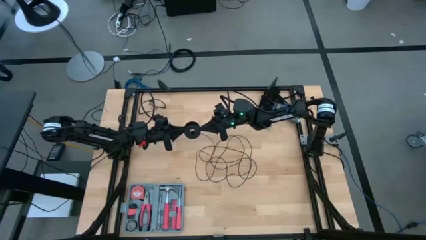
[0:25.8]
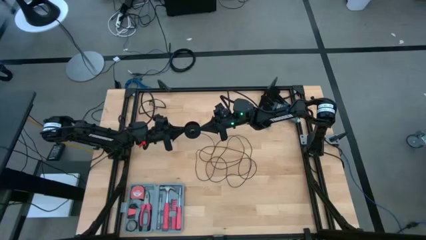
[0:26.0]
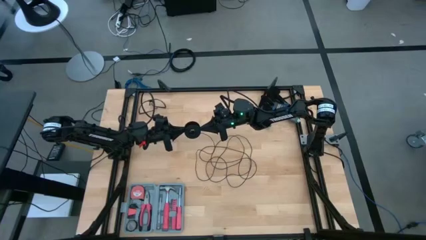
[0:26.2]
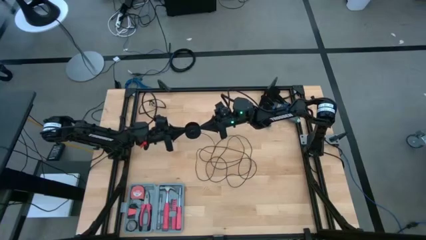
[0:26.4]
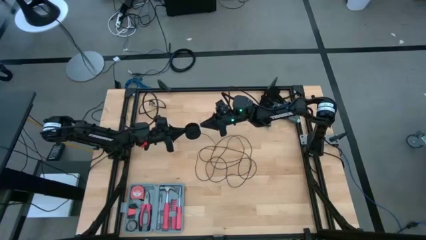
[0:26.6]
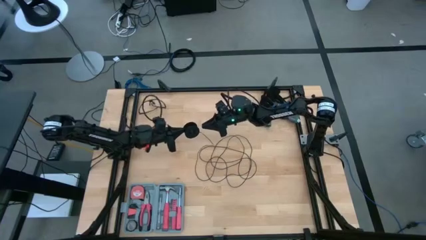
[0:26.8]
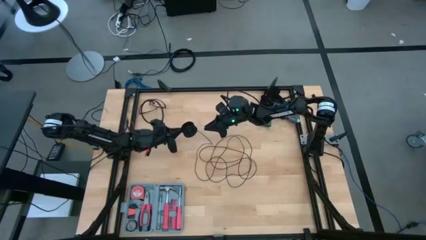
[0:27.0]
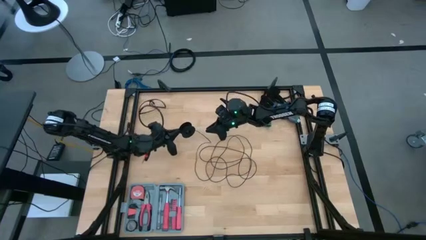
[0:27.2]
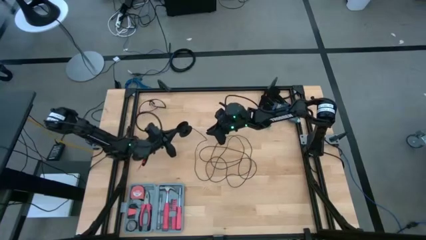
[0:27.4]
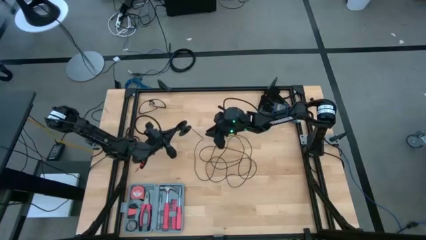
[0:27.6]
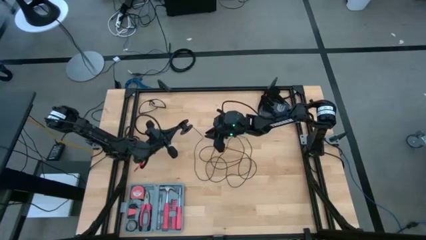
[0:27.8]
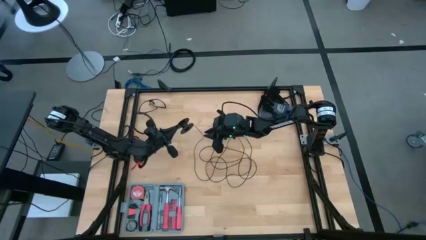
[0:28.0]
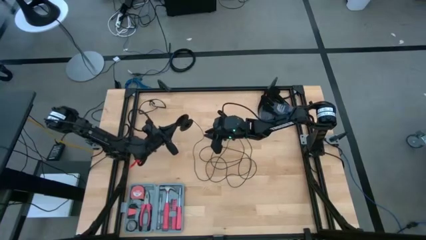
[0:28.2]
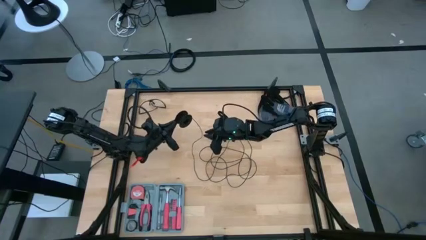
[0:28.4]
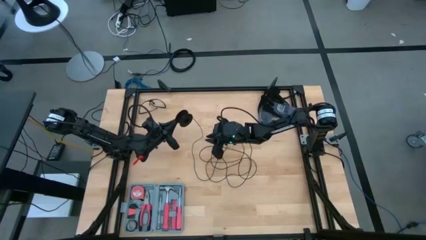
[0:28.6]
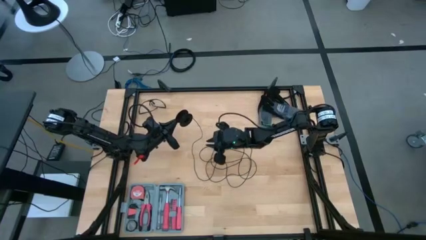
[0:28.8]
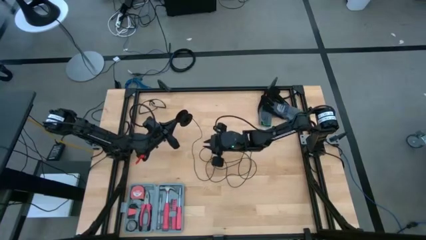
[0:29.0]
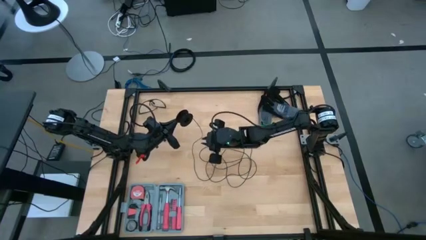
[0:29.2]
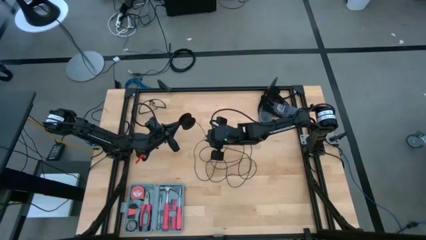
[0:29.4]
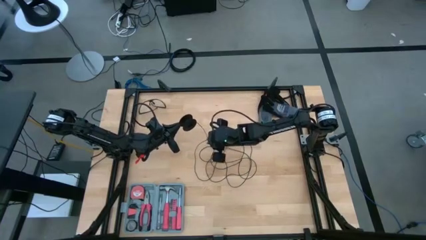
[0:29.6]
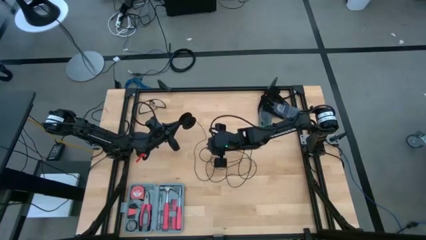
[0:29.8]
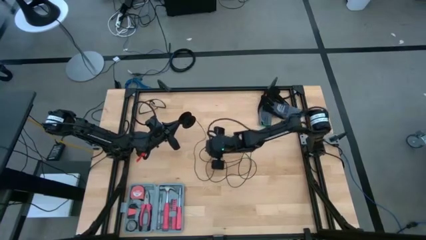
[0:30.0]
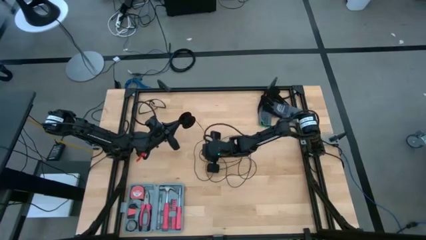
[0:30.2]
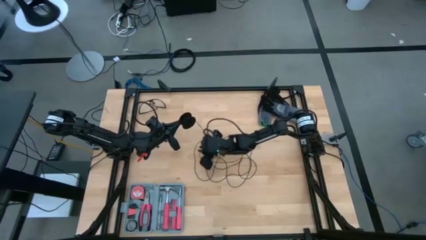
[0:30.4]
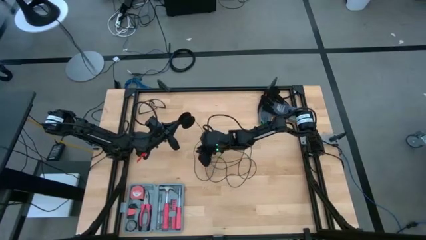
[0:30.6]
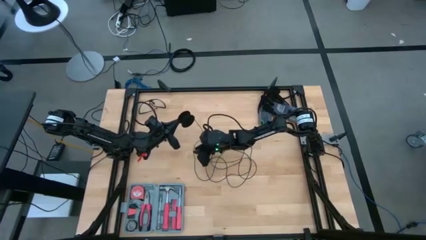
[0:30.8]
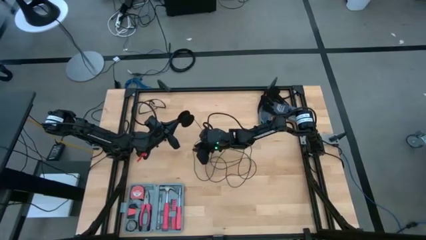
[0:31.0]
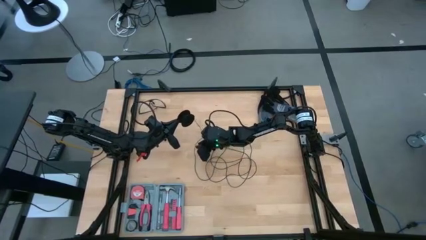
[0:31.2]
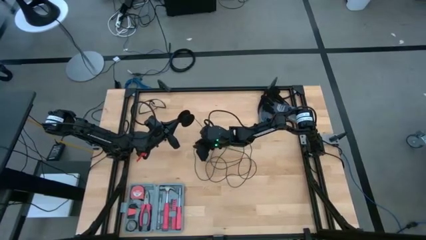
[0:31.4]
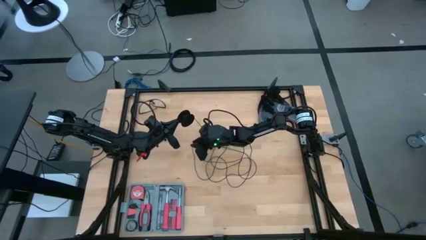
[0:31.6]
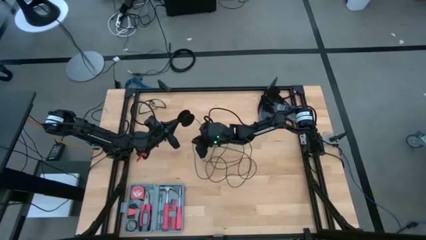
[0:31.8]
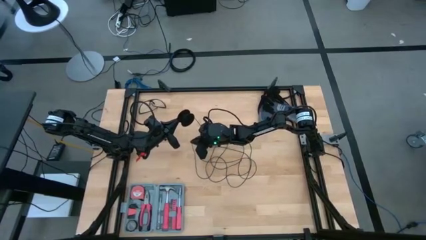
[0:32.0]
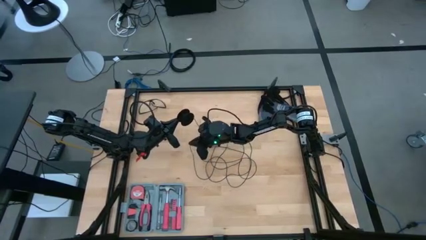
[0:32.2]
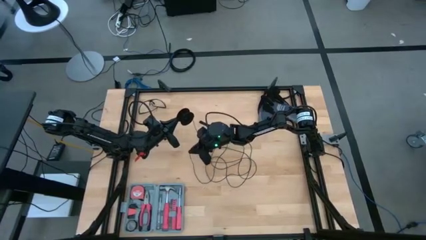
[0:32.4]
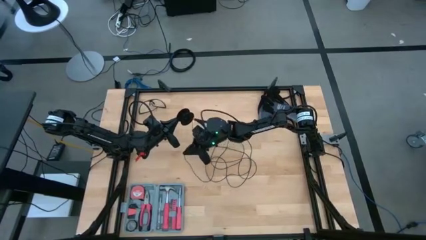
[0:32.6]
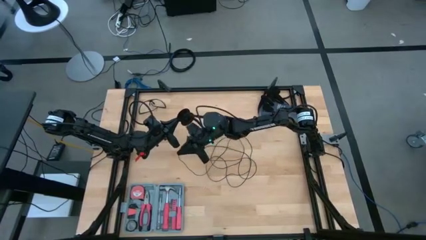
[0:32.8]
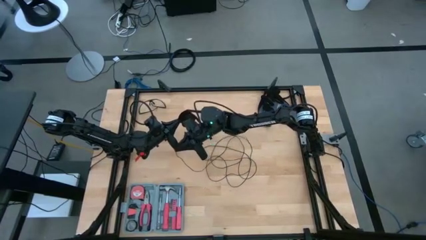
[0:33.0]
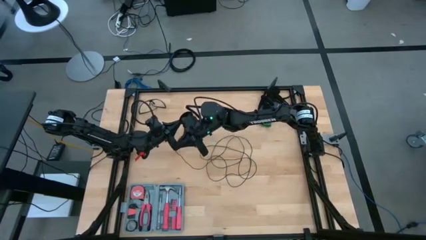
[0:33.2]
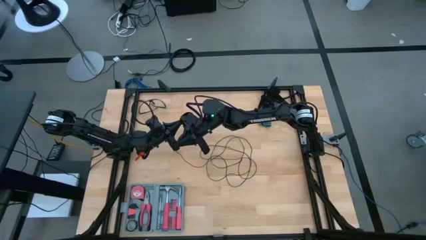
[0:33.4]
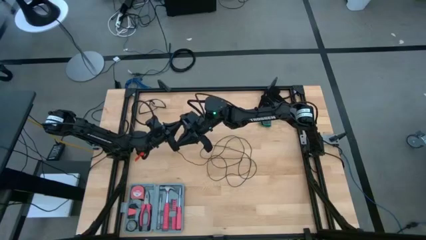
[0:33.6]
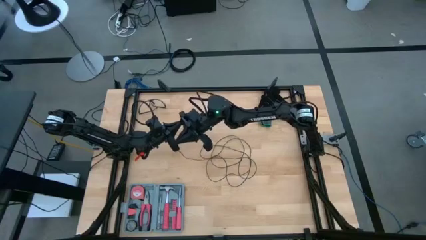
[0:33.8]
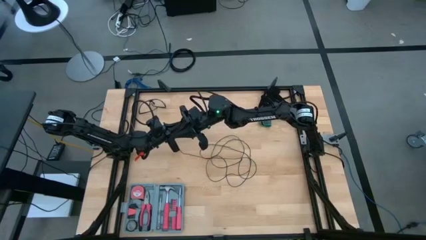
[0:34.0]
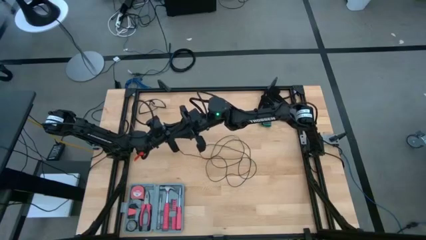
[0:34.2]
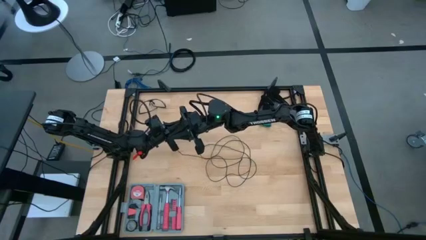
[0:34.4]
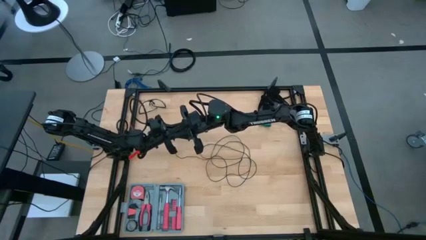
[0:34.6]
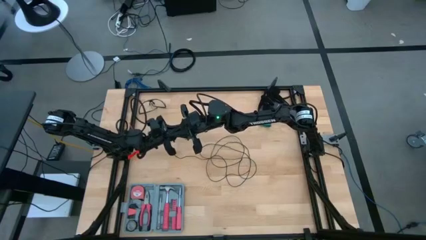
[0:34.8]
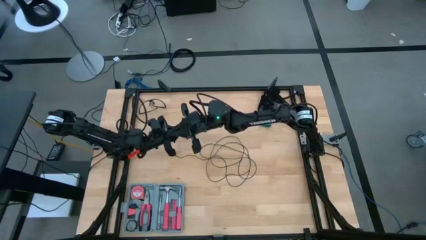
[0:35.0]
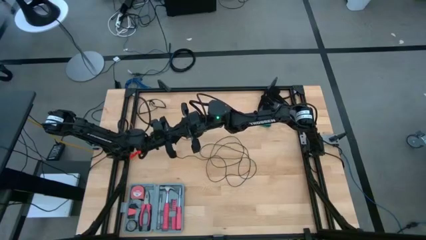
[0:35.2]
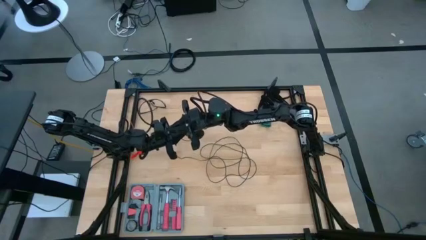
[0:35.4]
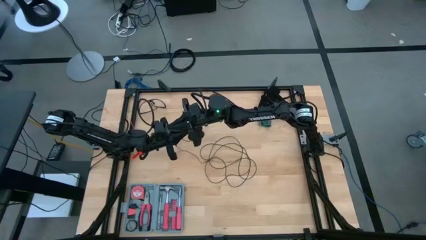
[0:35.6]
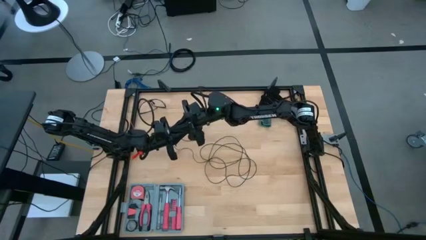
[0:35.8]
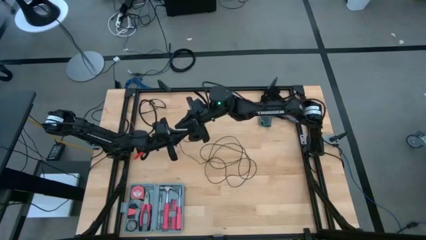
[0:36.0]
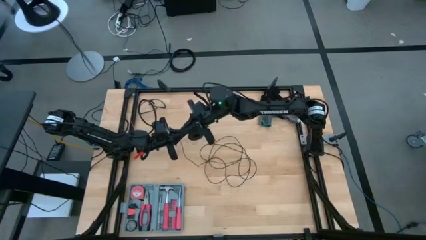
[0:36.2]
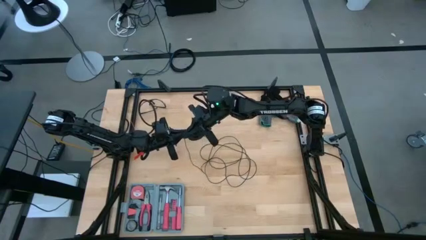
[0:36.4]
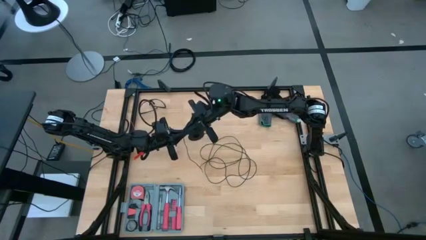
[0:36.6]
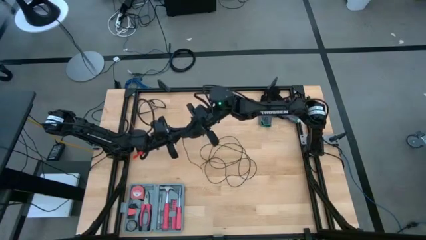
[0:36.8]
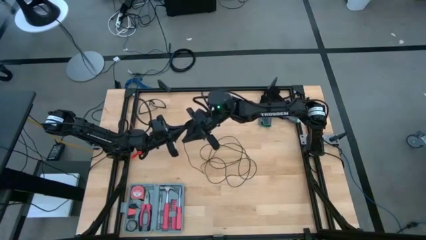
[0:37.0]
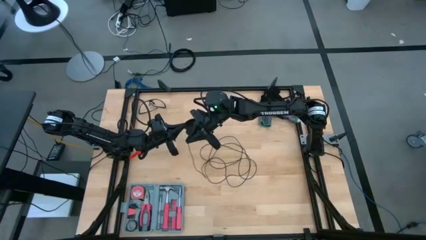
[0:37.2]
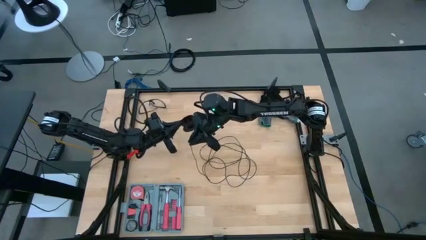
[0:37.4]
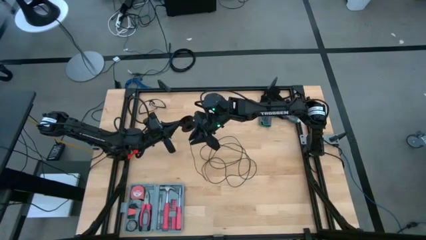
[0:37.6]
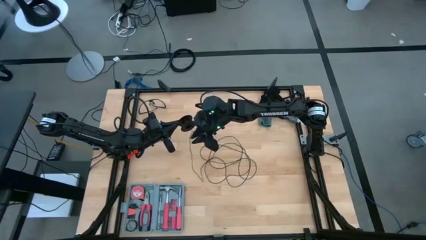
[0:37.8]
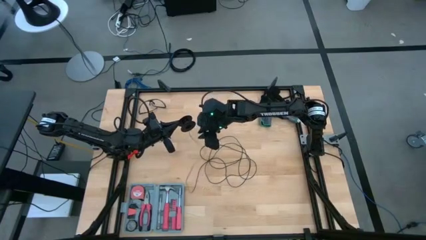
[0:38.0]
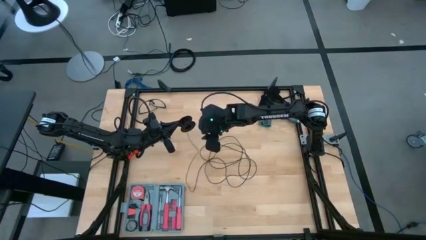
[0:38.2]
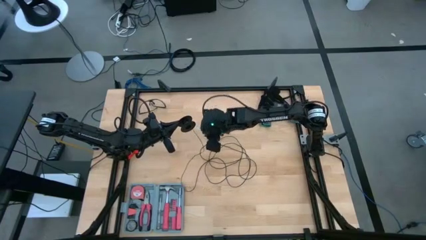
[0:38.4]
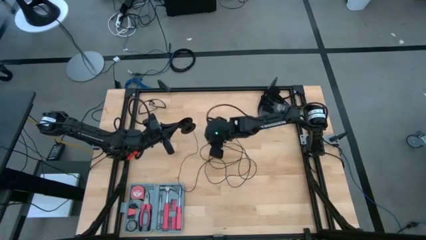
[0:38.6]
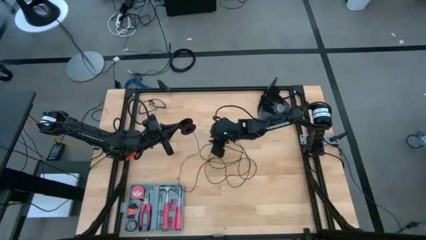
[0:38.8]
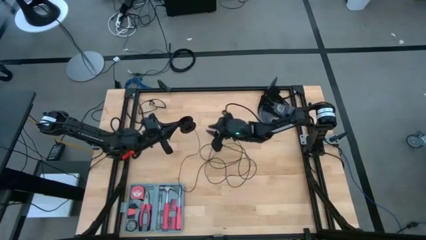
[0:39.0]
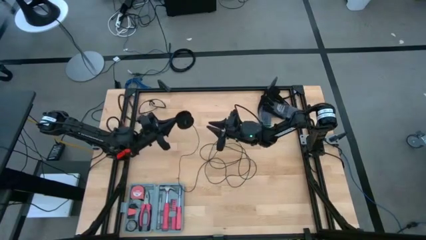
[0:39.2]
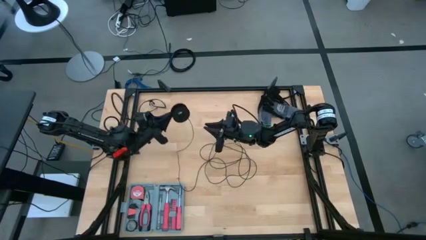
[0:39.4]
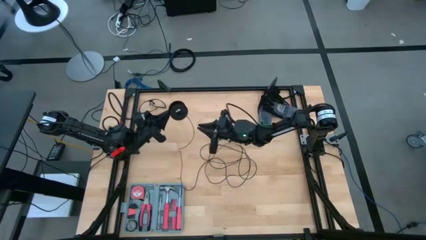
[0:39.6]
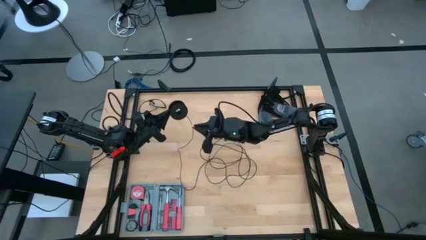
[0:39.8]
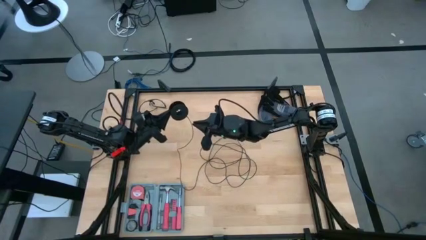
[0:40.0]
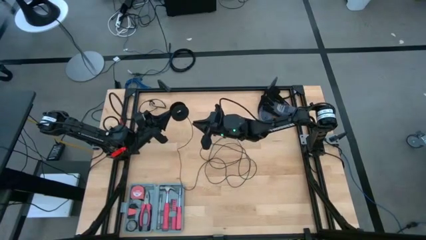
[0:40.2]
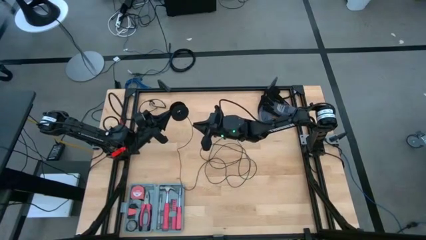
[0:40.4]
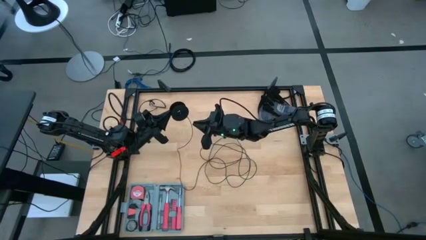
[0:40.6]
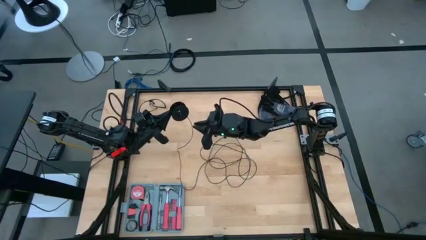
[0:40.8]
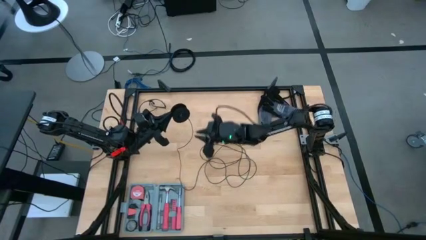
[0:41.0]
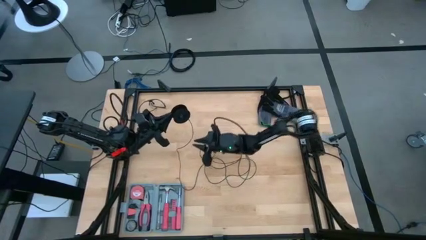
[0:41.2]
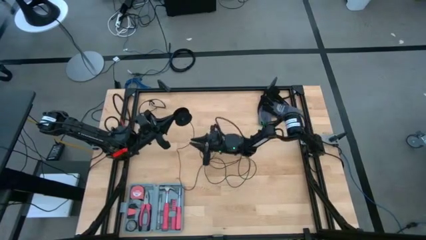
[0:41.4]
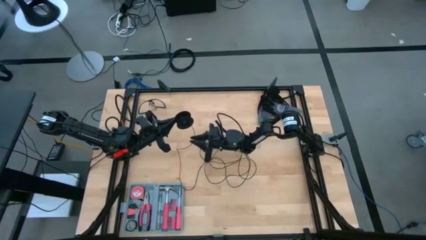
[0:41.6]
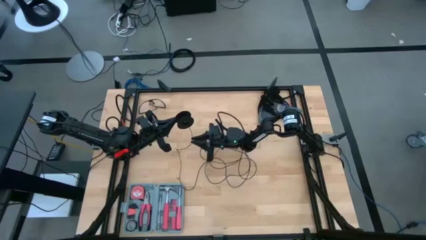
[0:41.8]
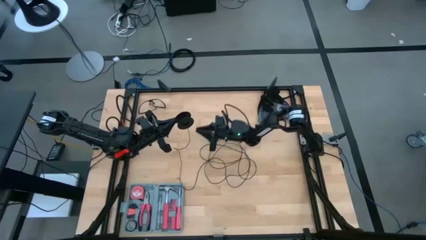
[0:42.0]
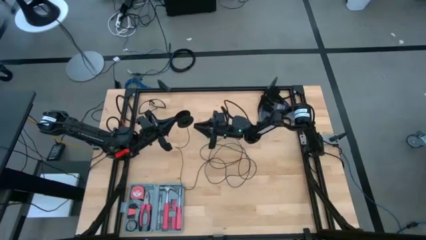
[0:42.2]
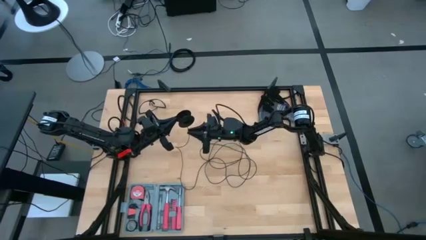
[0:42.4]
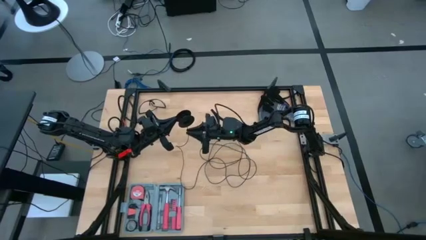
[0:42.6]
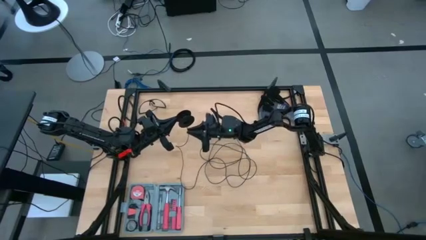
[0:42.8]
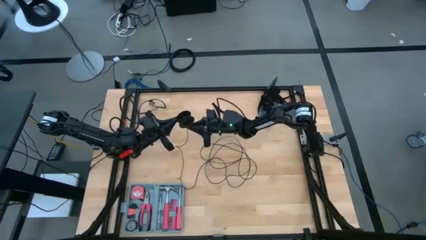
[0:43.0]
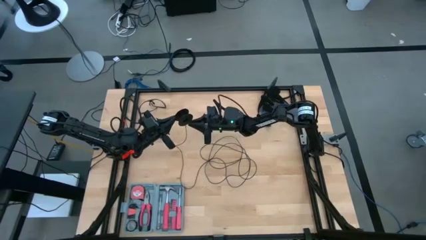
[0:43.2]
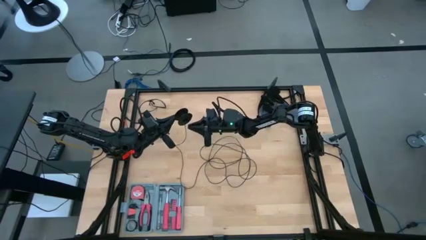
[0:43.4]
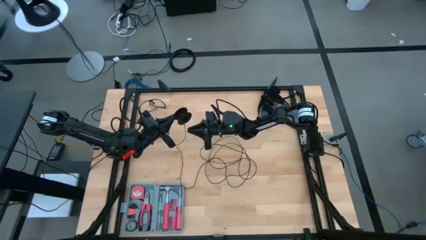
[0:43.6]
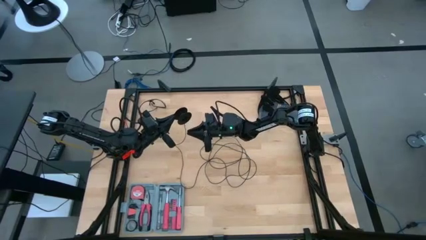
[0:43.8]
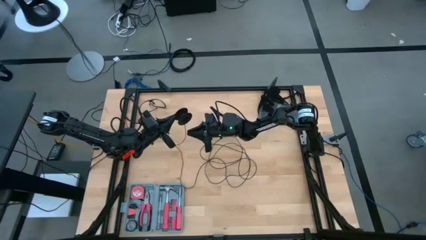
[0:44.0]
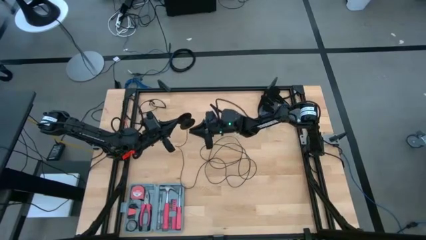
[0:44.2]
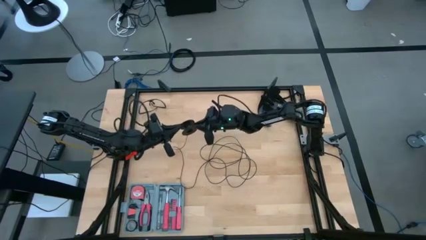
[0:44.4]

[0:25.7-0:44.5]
Task: Coil cords
Coil the black wire onto the black spool
